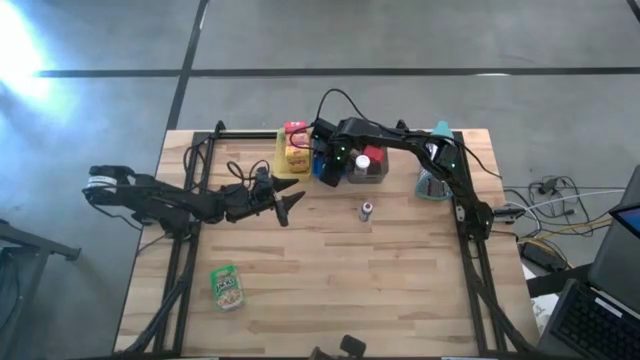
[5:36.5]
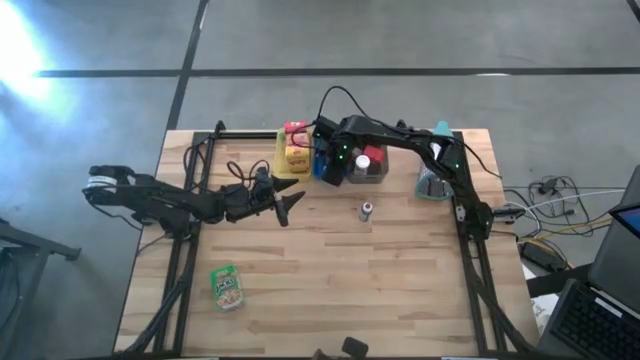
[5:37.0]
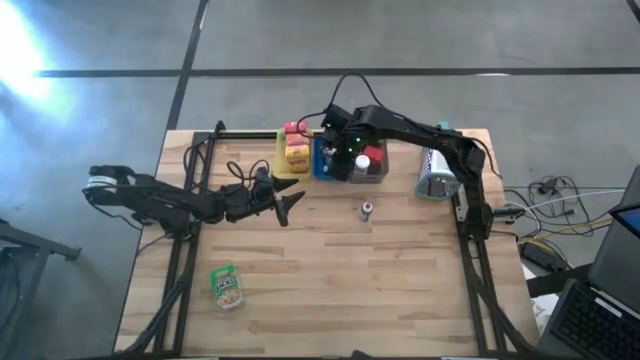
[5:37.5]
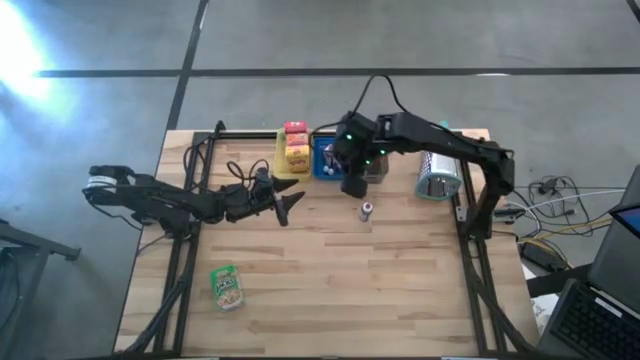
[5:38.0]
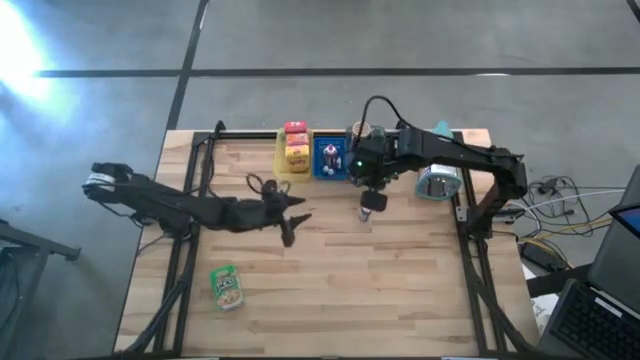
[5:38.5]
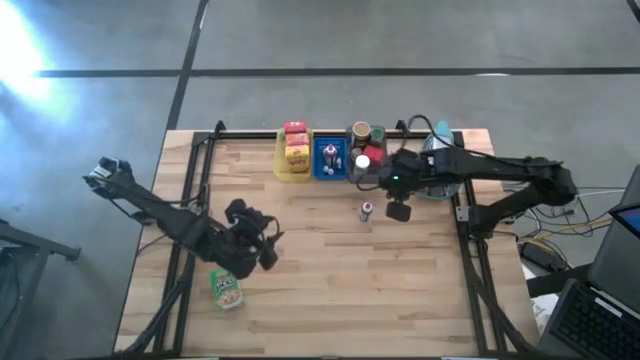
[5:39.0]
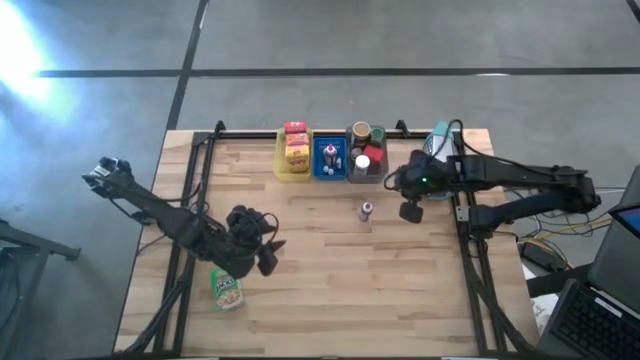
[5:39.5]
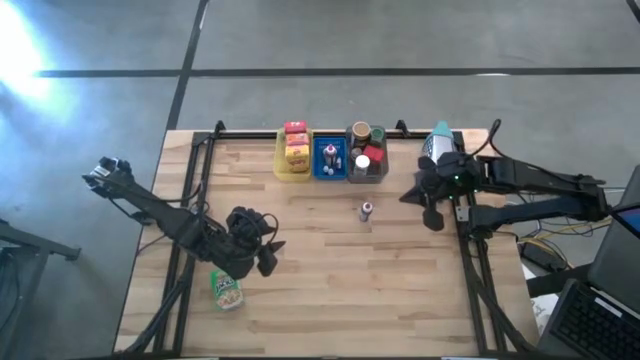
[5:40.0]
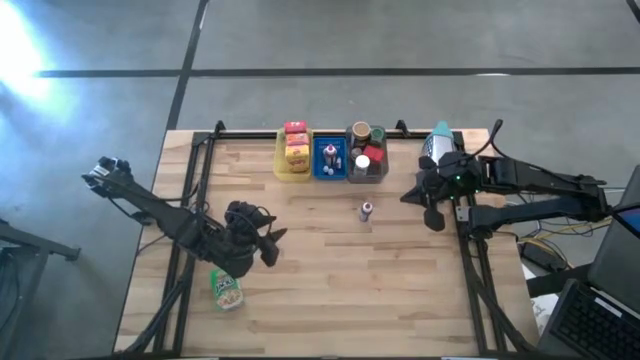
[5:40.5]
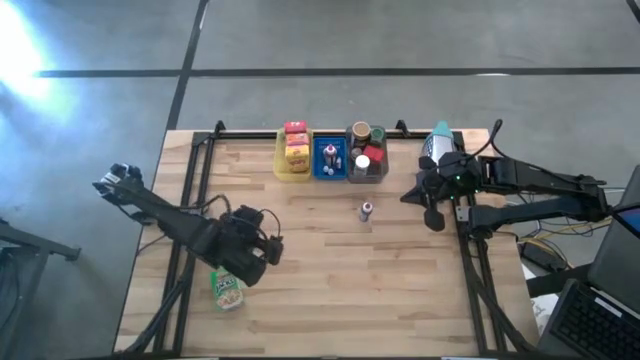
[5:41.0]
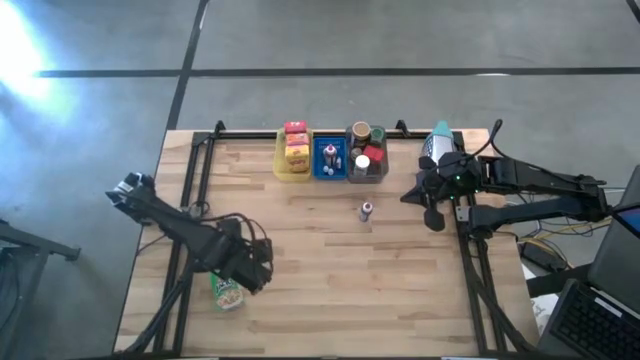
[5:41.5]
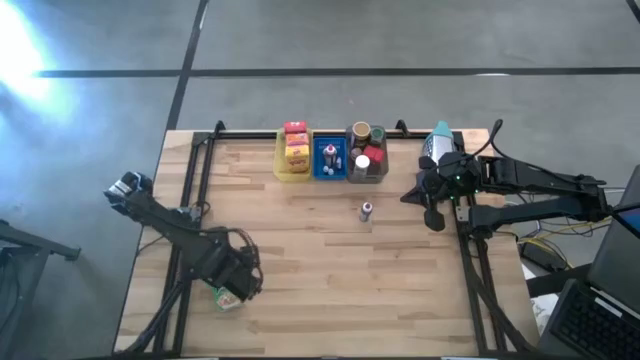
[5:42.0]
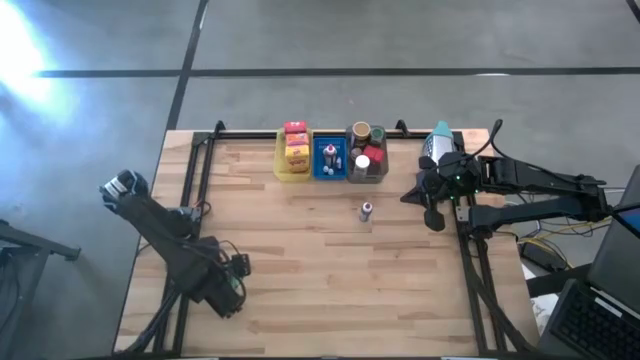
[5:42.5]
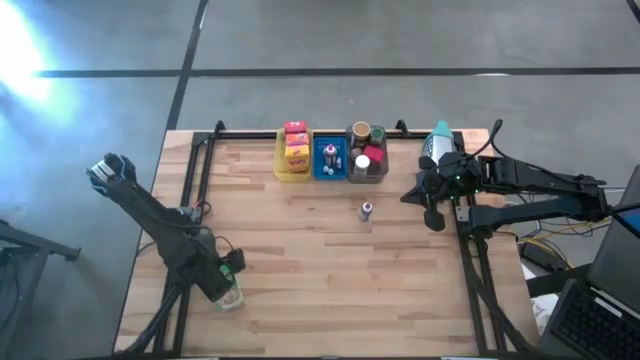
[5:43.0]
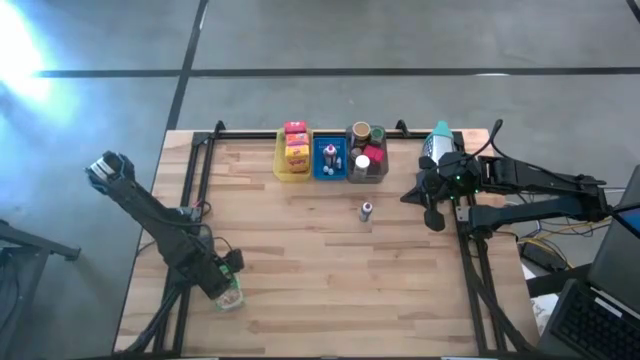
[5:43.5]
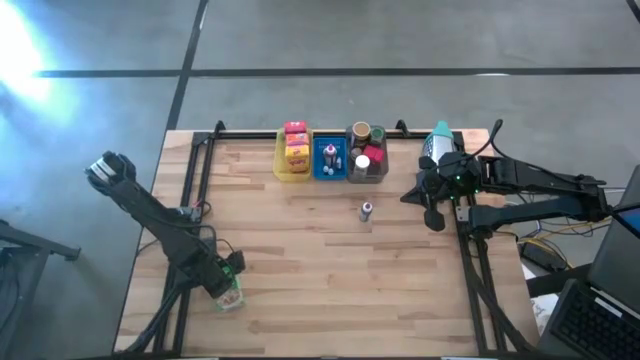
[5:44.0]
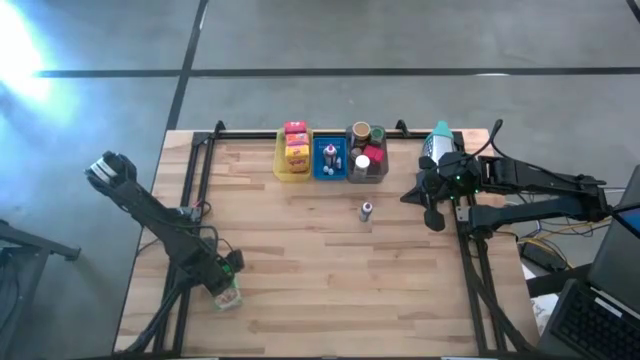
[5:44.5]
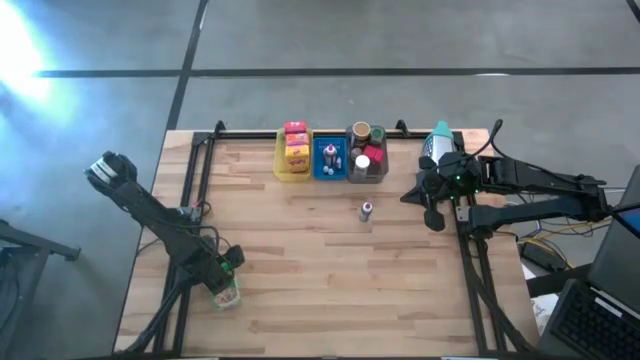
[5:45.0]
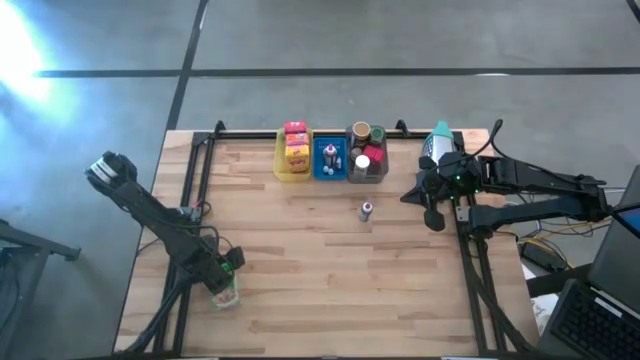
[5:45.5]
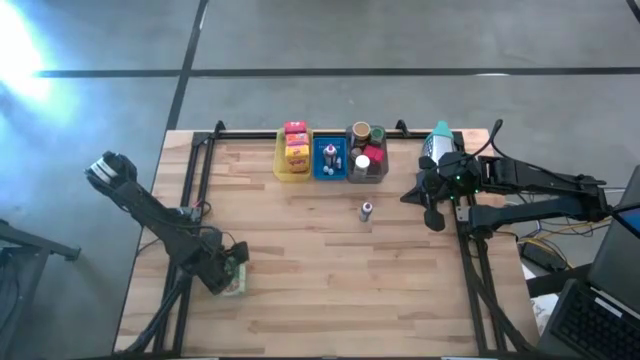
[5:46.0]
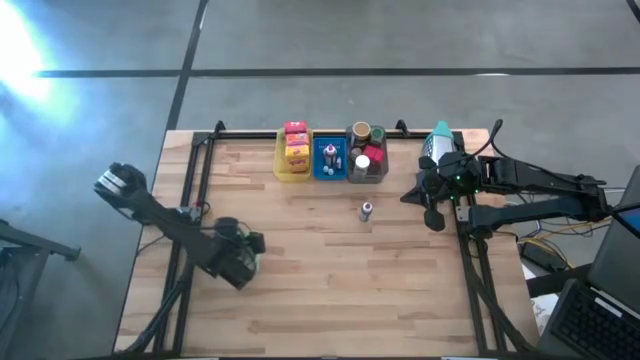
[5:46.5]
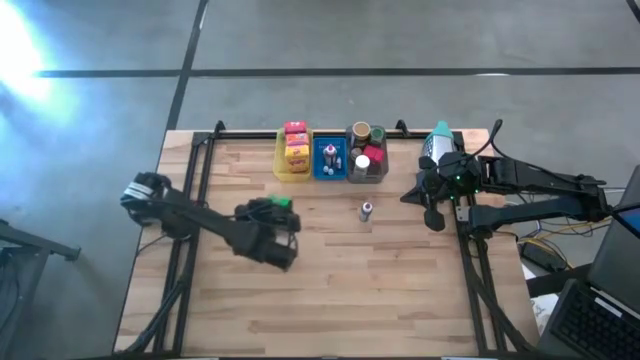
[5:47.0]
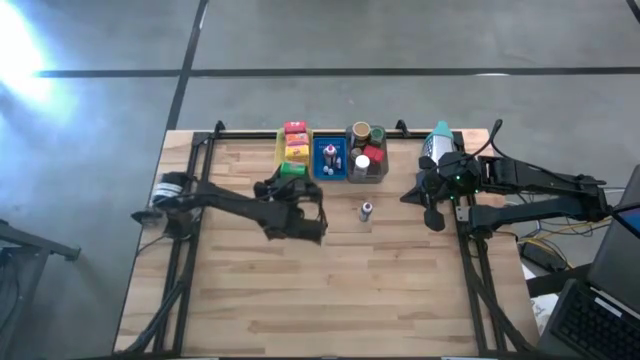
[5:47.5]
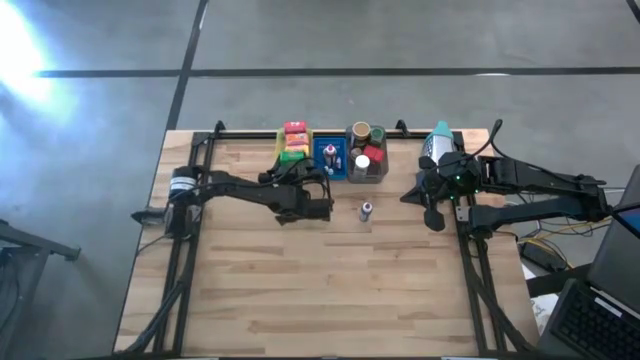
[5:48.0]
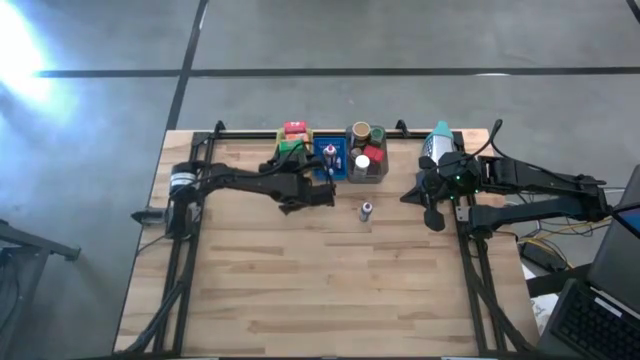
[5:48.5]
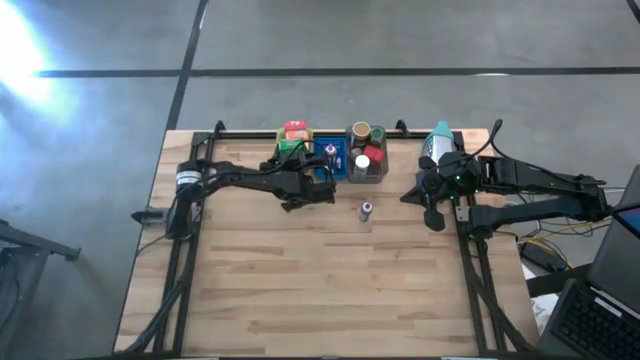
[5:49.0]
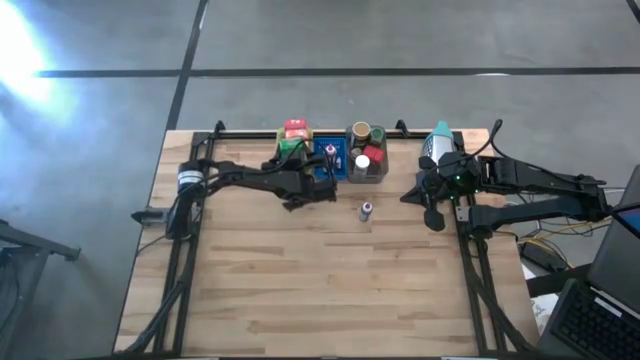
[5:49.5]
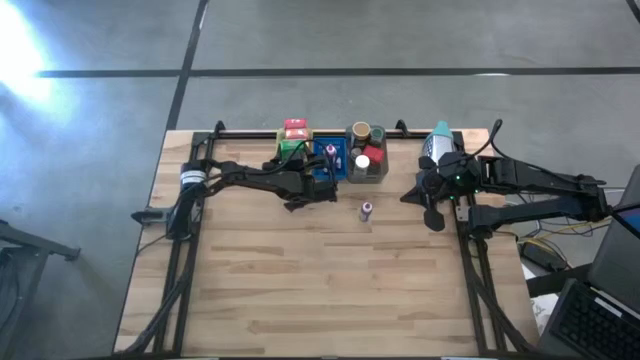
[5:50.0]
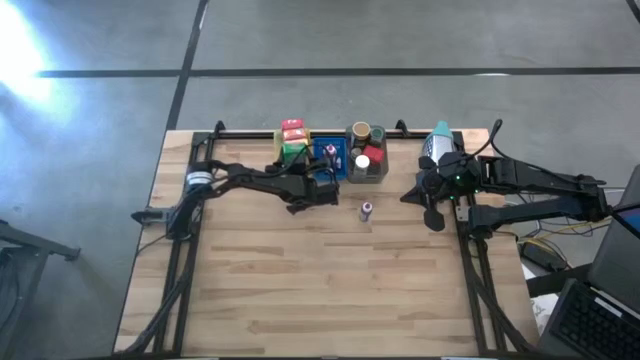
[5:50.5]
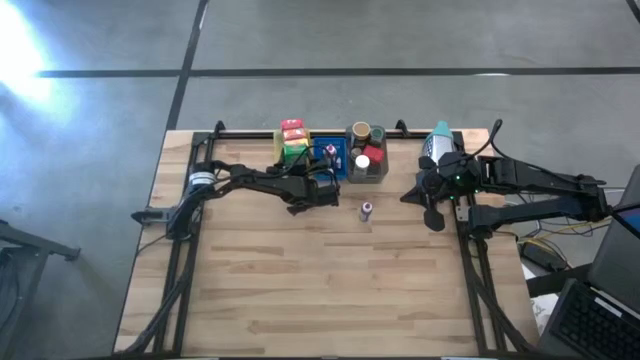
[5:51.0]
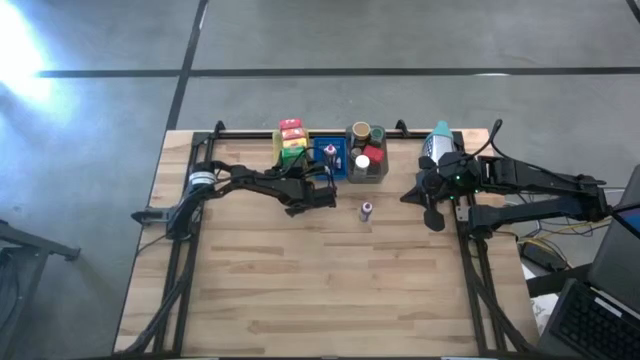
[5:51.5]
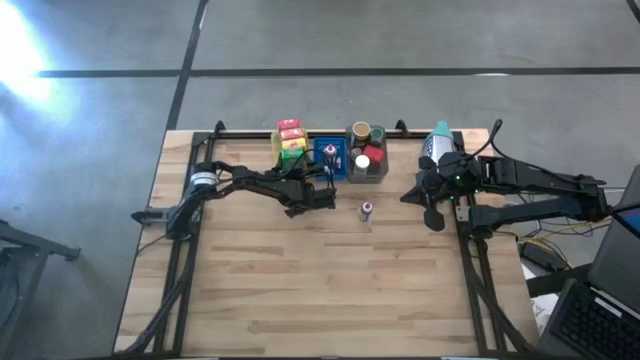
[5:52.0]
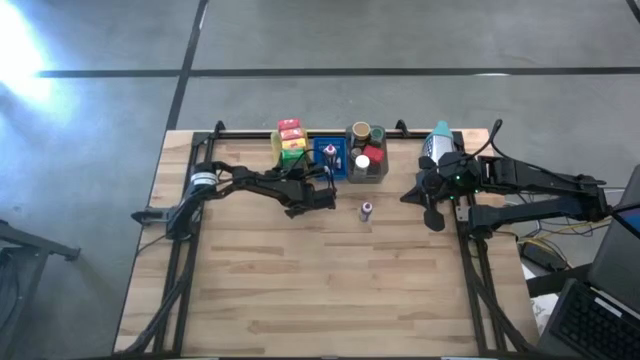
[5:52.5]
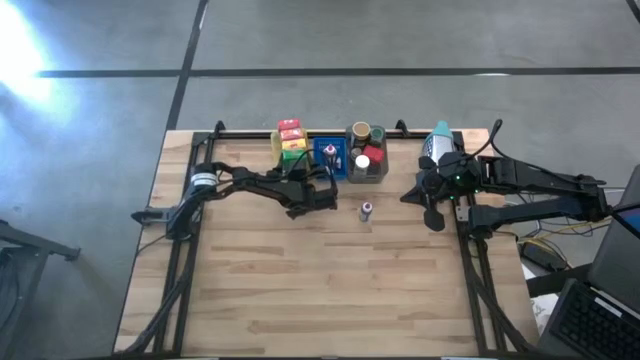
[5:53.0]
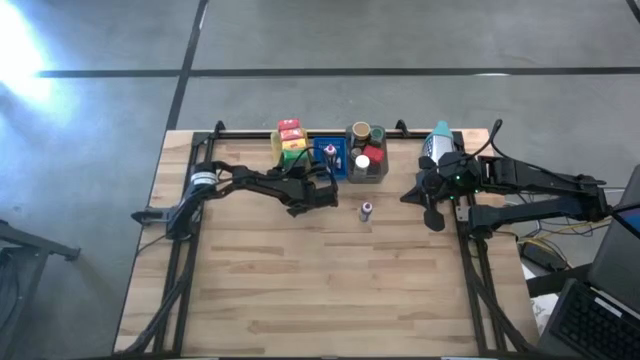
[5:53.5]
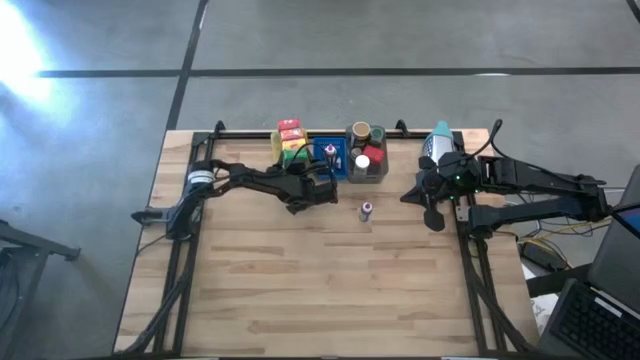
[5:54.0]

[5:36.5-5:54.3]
Task: Pick & Place Kitchen Items
Put the green cereal box into the yellow bin

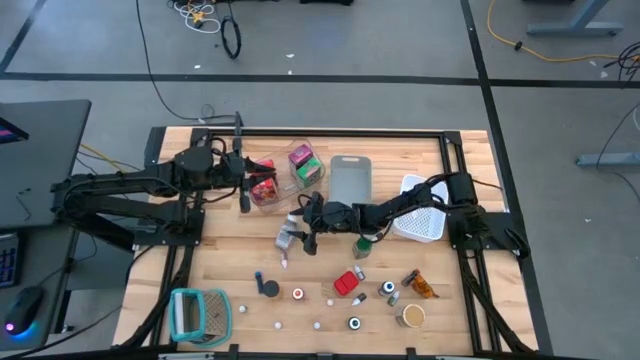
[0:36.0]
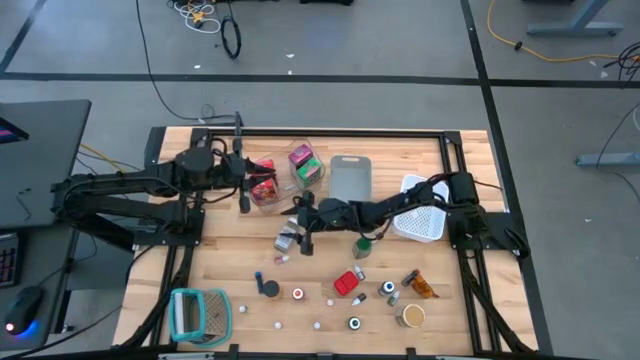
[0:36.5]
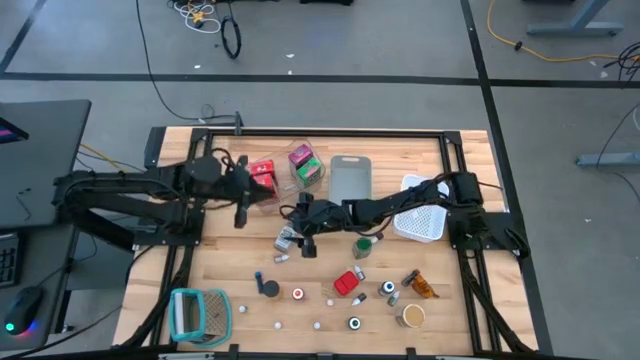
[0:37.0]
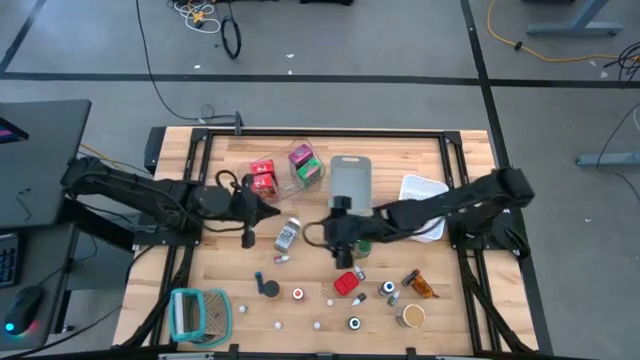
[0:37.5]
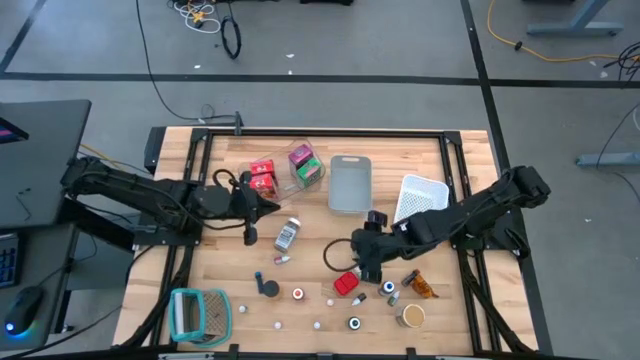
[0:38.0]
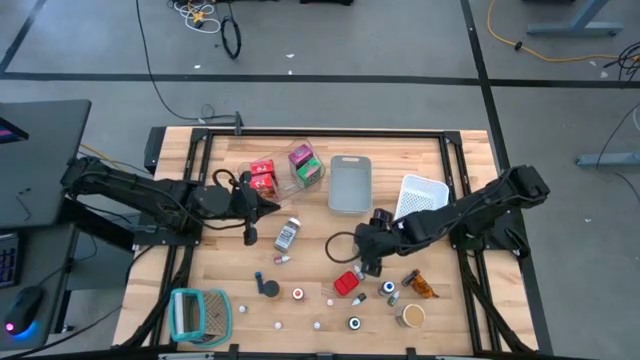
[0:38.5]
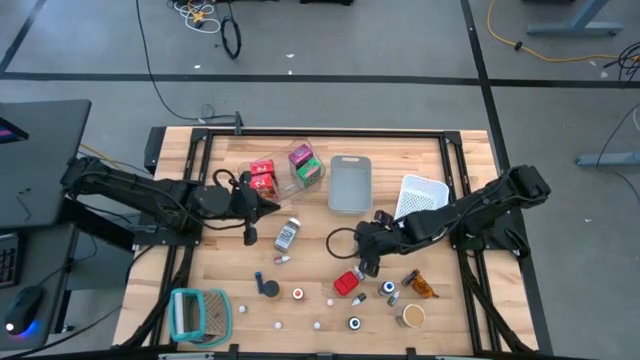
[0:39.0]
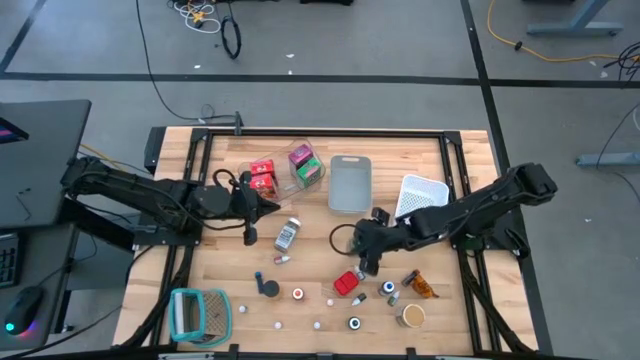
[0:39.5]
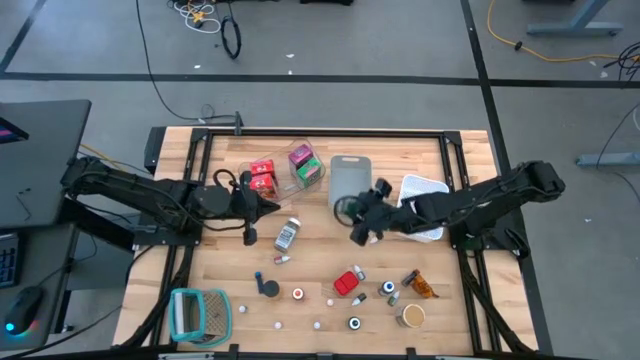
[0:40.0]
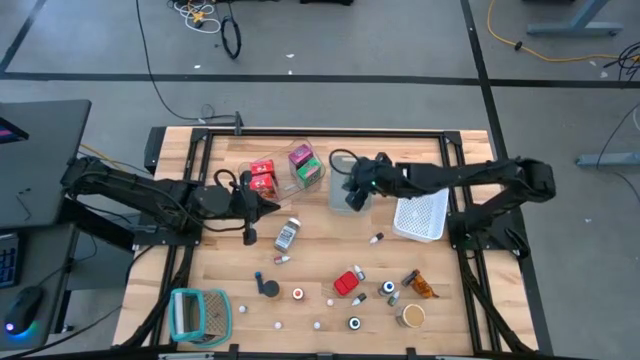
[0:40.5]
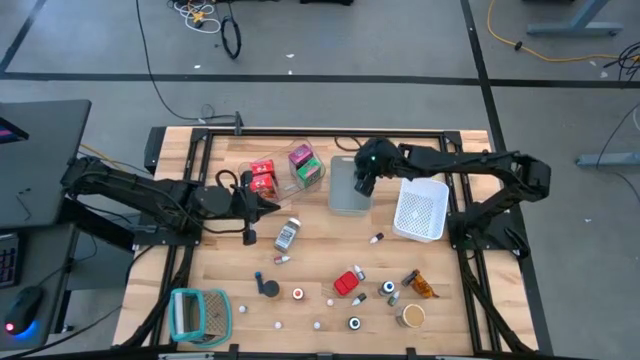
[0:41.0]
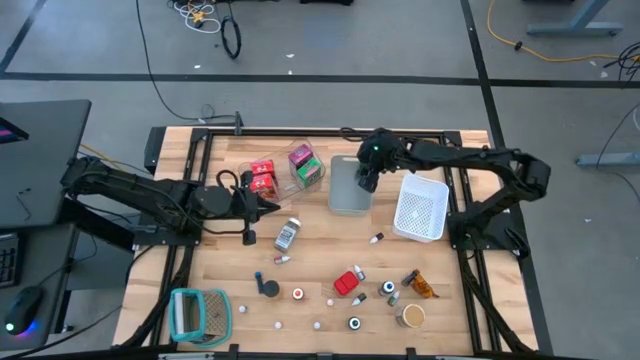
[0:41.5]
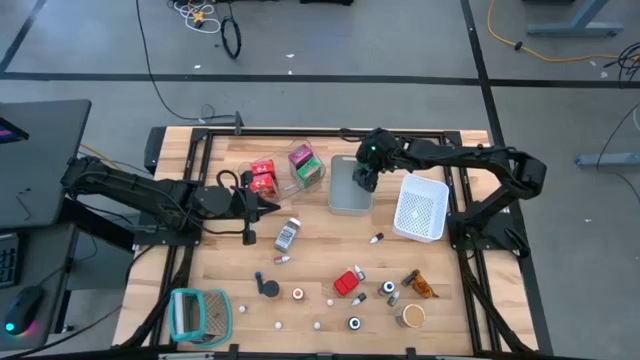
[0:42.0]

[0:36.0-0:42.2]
Task: Pick & Place Kitchen Items
Put the green spice bottle into the gray bin
